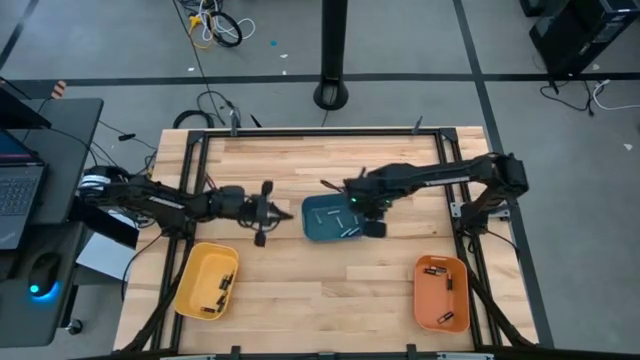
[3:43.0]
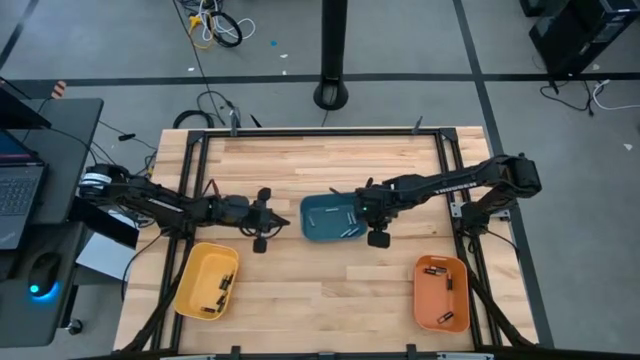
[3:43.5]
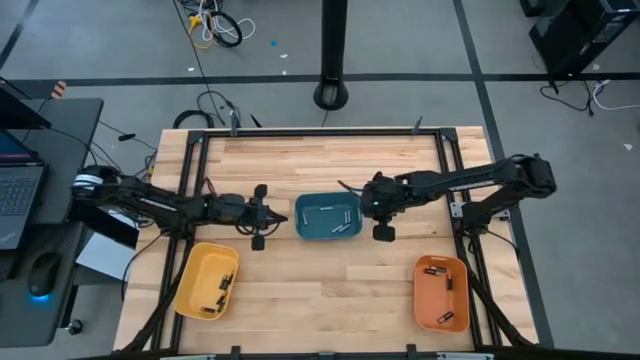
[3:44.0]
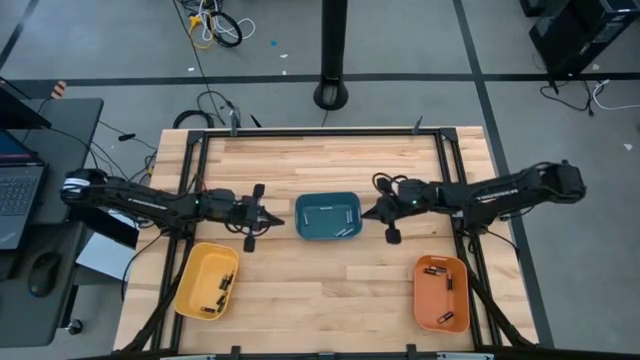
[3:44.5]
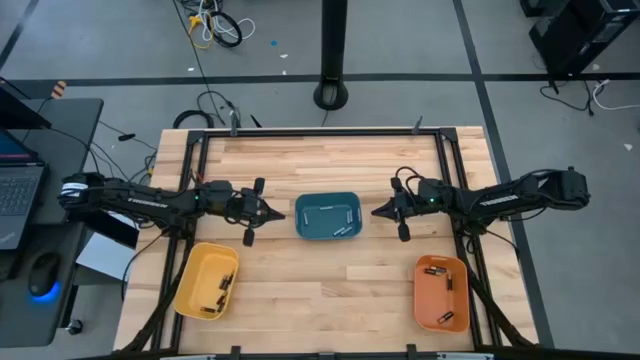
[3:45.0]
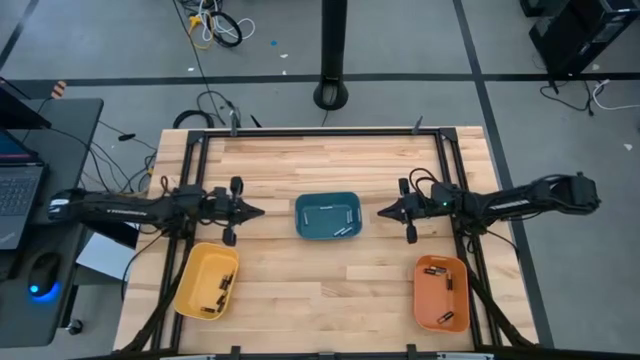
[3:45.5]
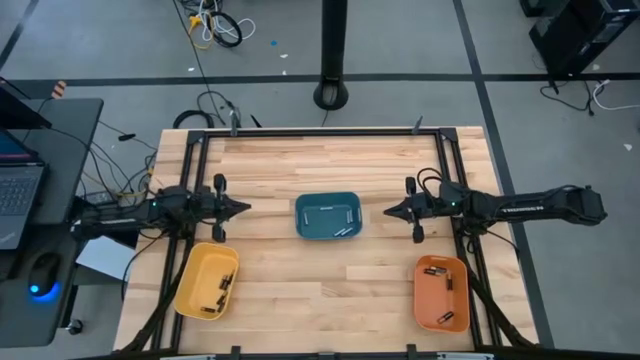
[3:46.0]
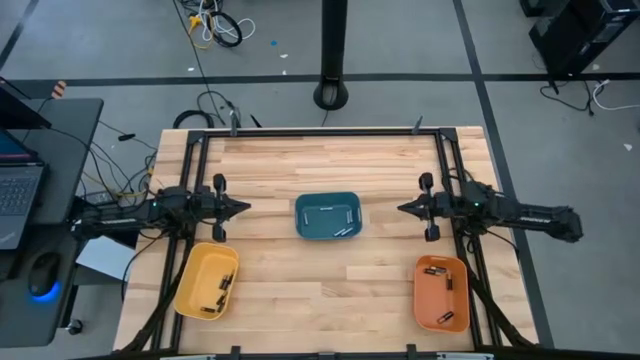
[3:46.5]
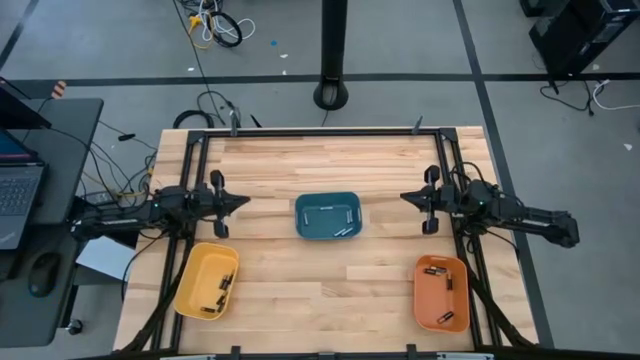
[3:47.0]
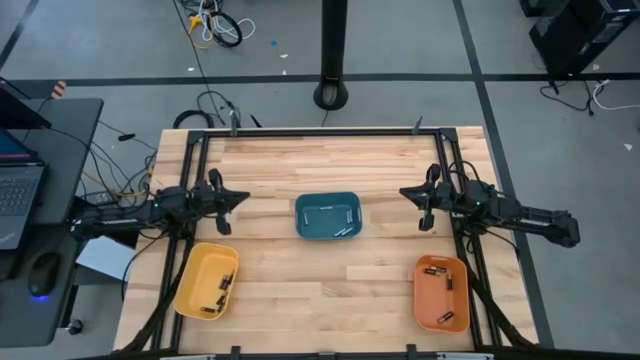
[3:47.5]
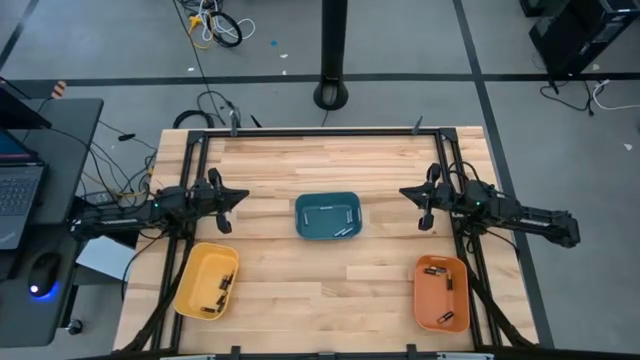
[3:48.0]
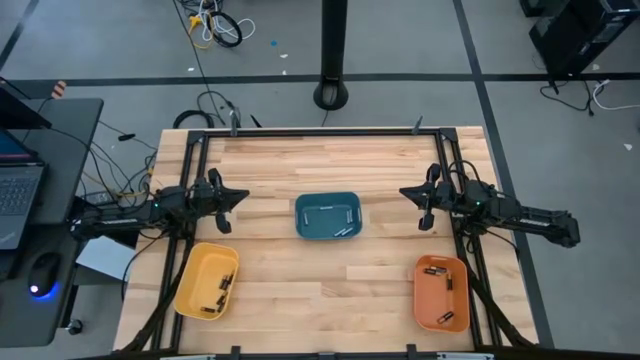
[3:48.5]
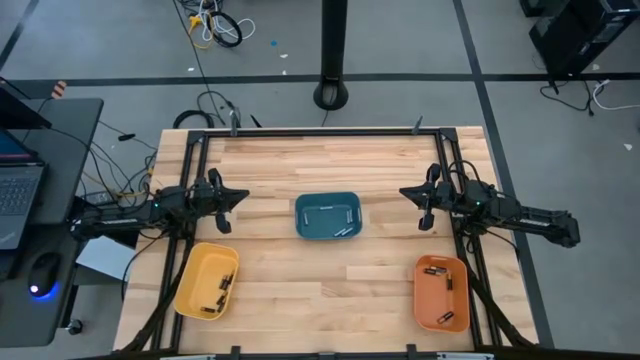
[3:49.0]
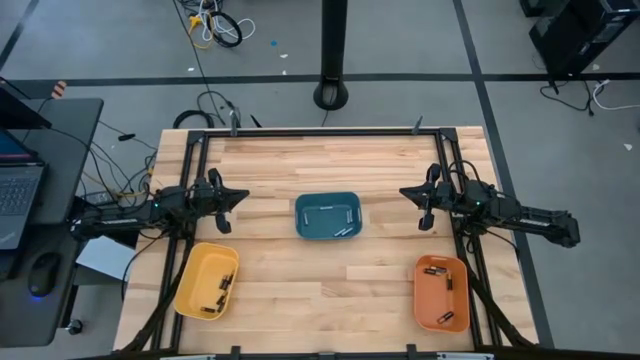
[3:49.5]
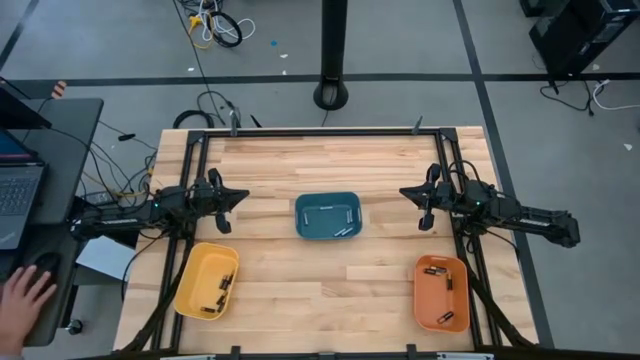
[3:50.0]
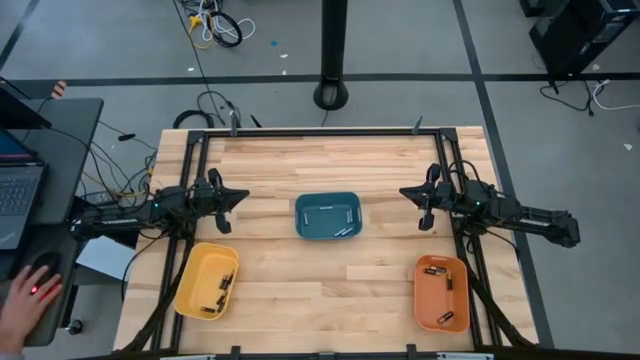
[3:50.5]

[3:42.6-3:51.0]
Task: Sort batteries
Return to Home Position

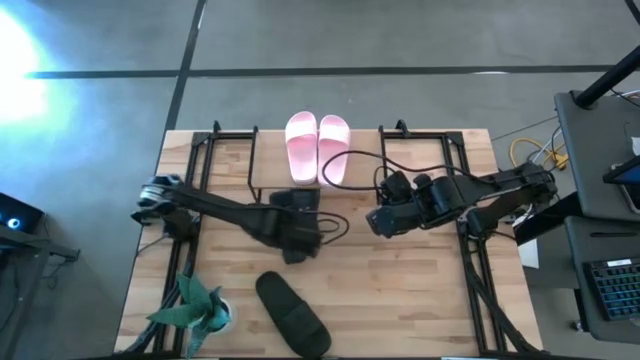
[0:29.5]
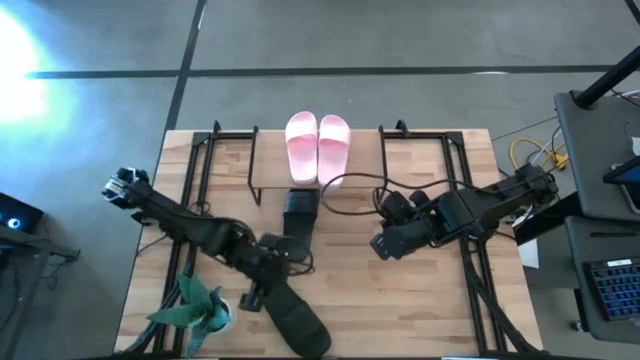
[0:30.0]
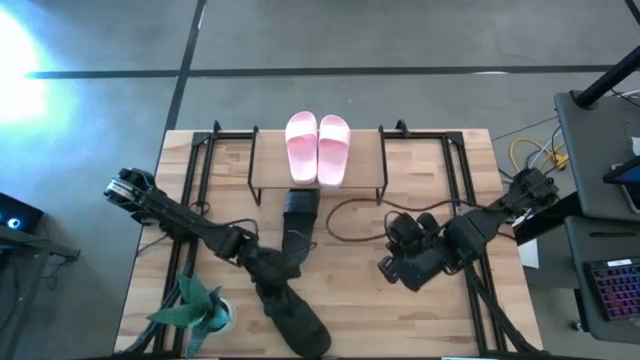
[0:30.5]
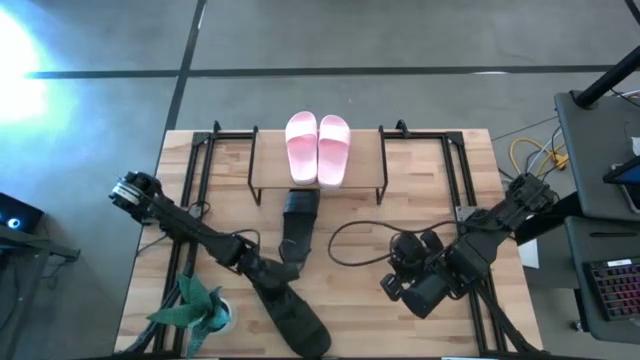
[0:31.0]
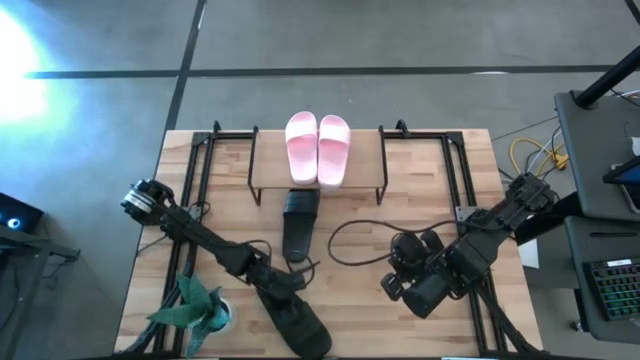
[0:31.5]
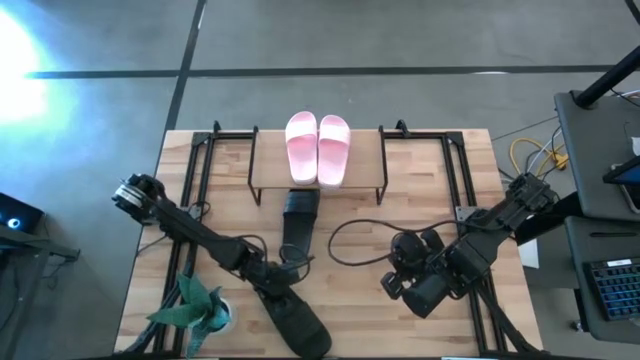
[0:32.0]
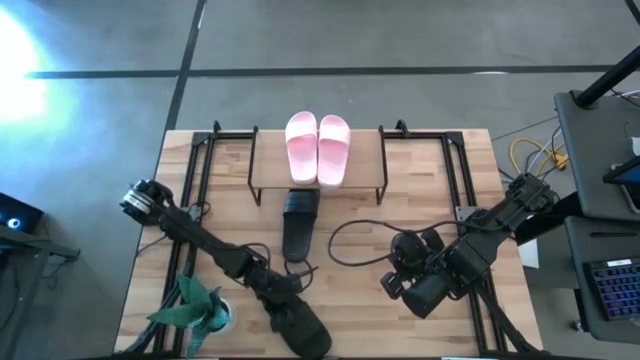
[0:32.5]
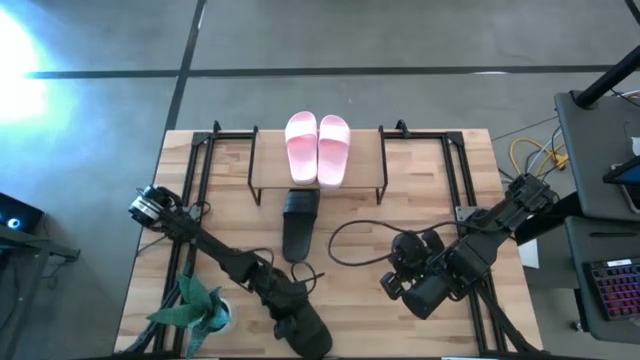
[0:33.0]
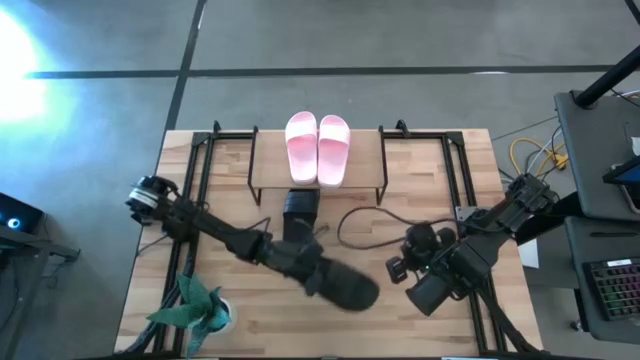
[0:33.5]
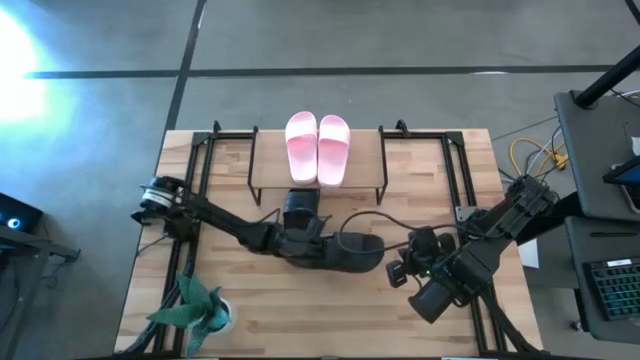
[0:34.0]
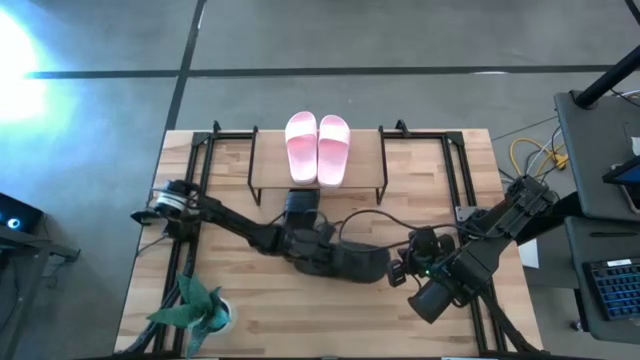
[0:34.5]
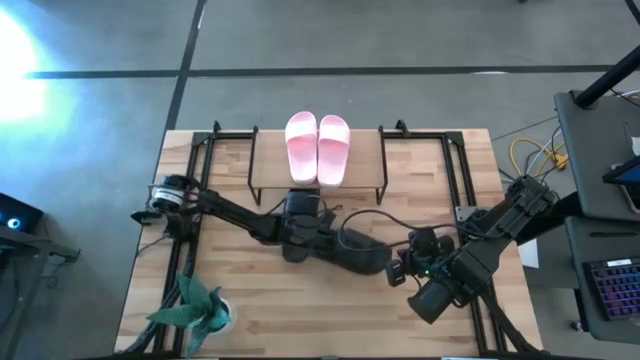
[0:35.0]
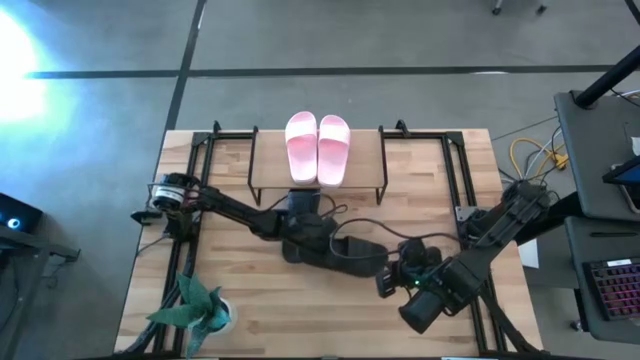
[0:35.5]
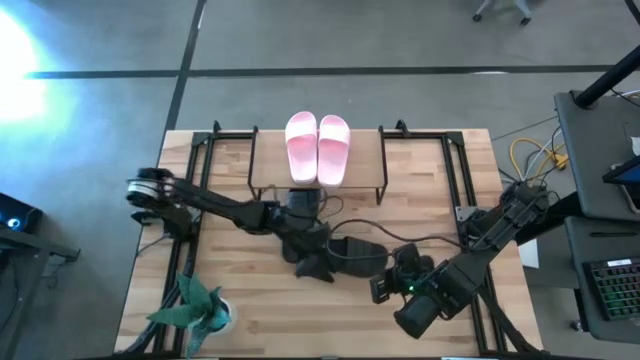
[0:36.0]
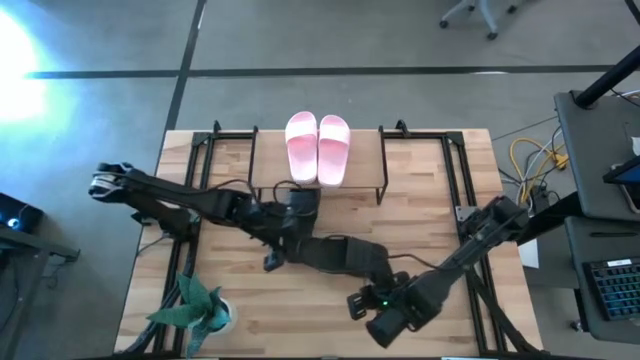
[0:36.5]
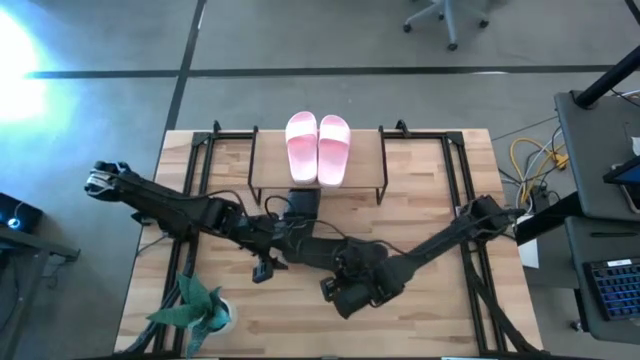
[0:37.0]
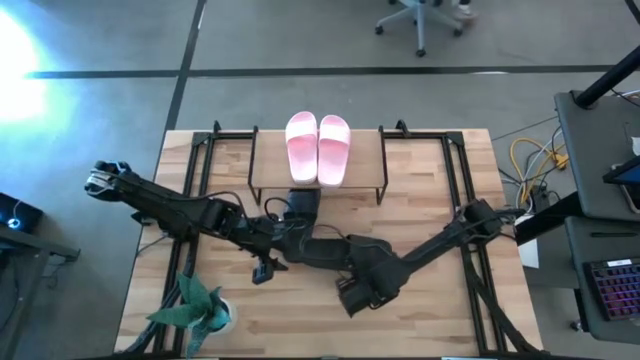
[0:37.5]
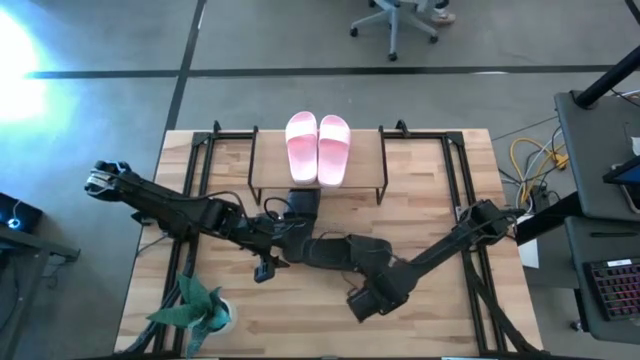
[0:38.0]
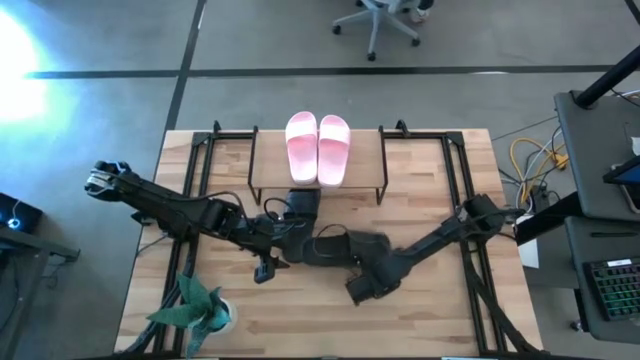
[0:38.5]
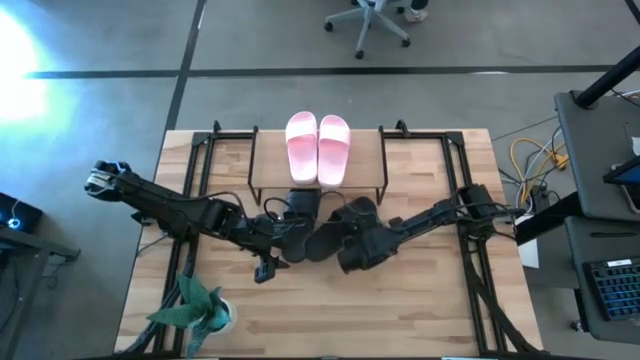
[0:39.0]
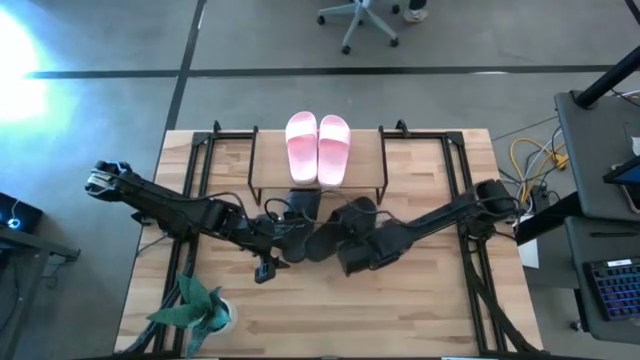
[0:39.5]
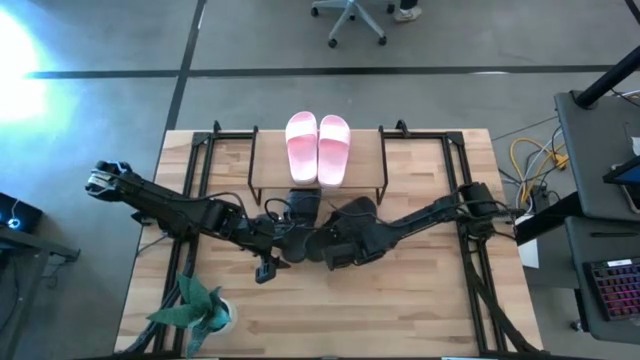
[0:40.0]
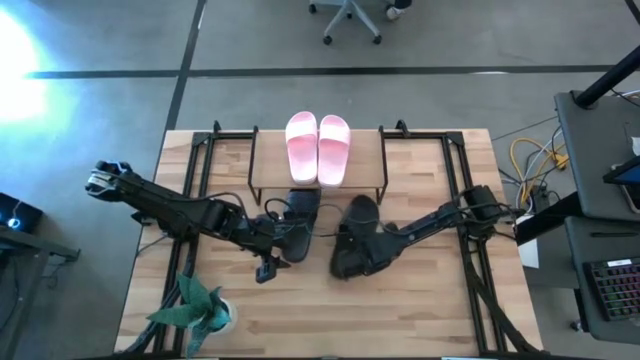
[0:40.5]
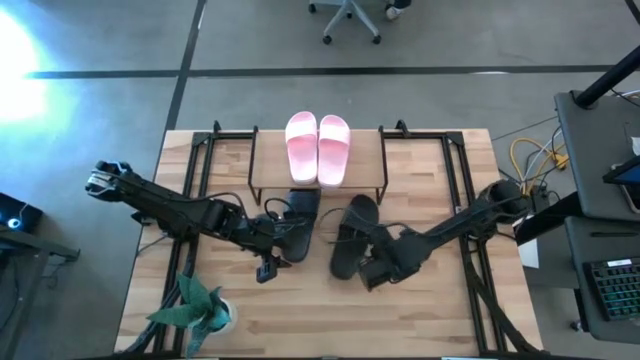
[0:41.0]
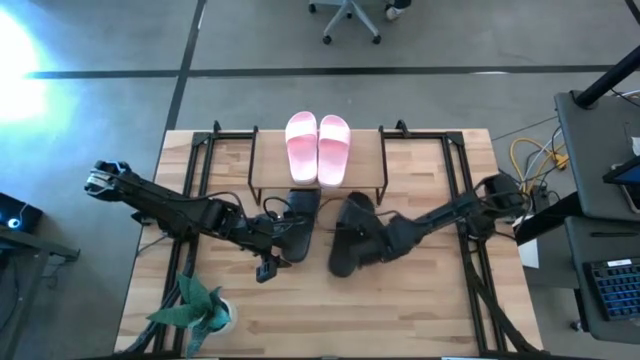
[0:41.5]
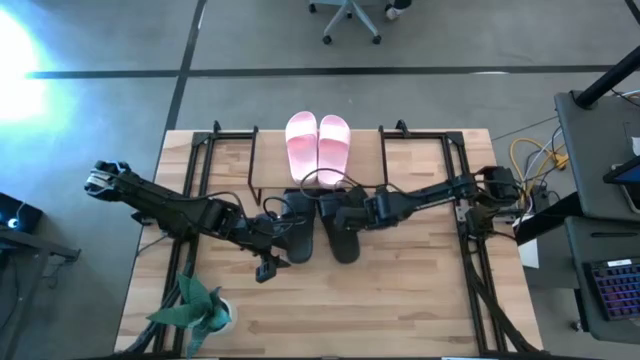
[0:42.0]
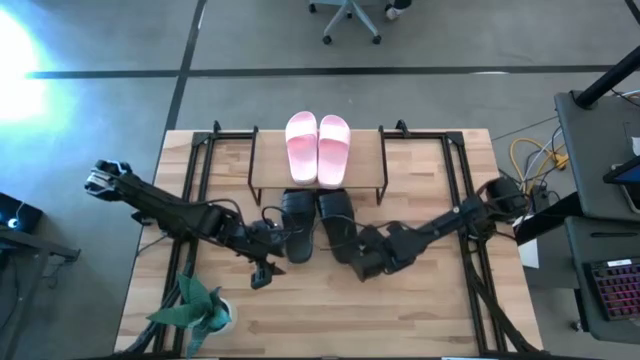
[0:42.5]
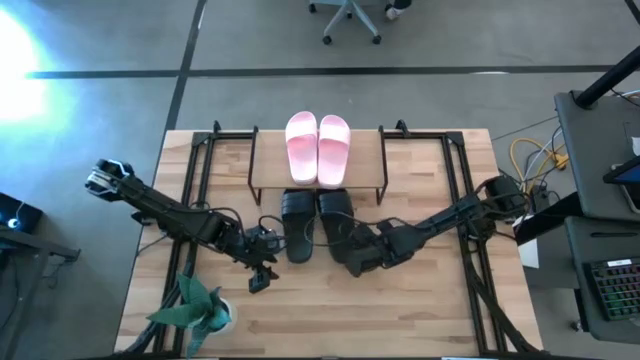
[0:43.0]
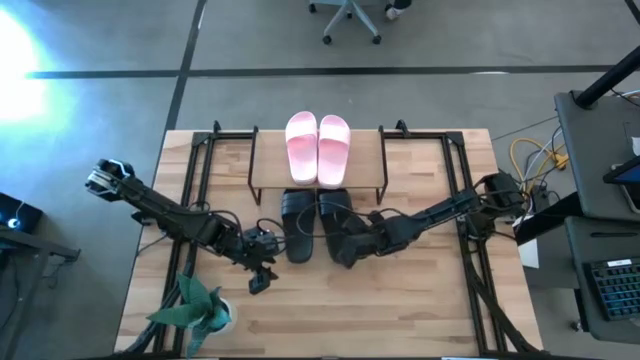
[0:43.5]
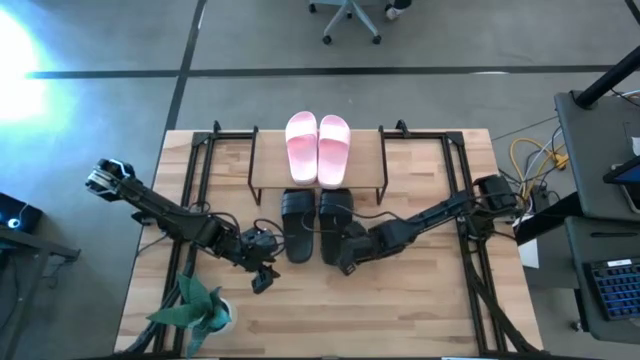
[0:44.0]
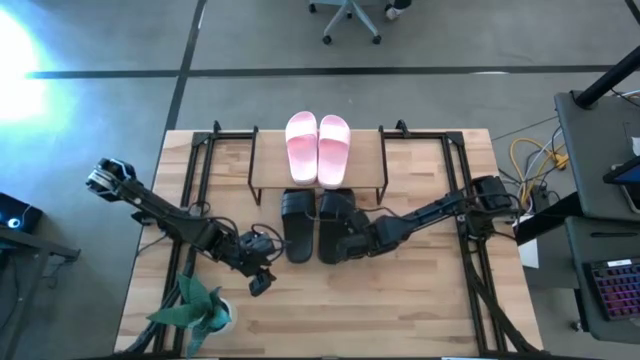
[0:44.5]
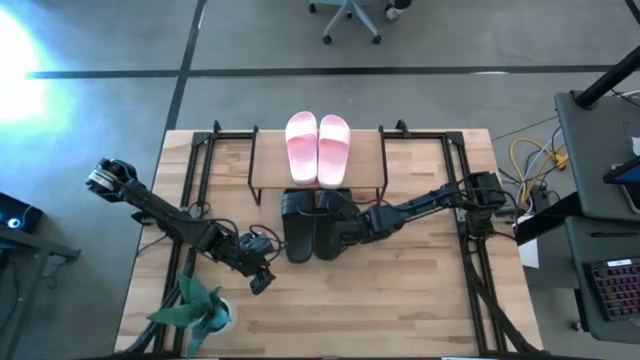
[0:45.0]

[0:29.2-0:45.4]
Task: Pick and place slides into the shelf
Put the black slide under the shelf
